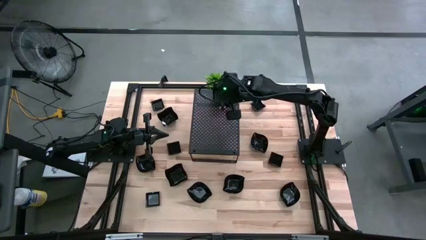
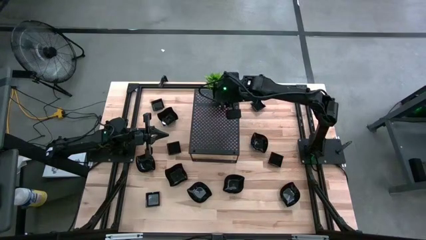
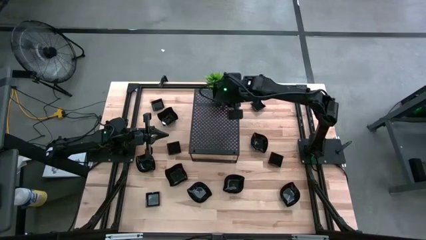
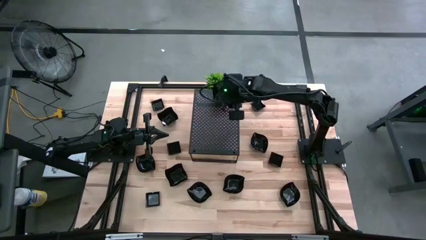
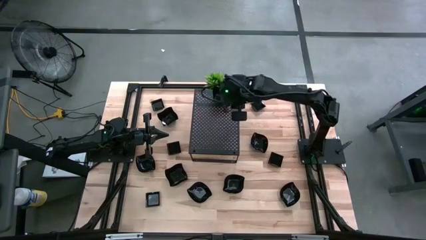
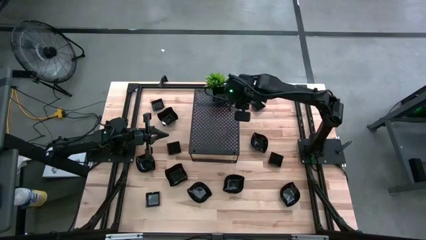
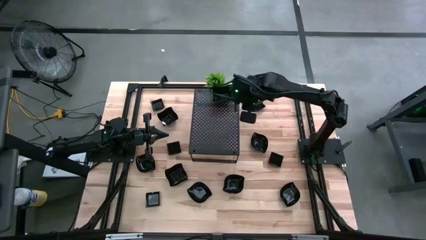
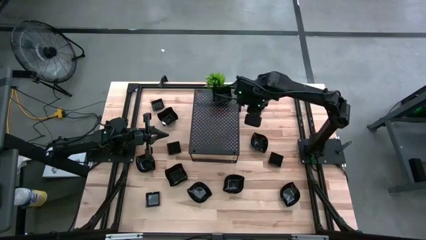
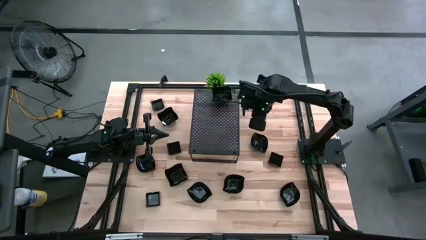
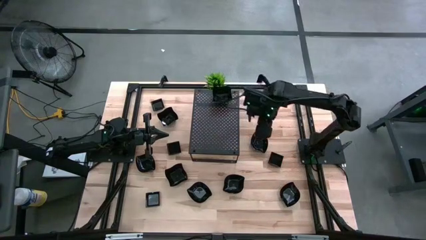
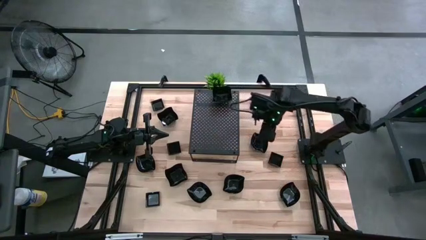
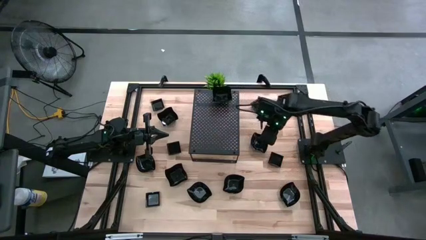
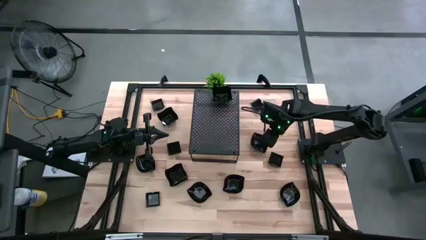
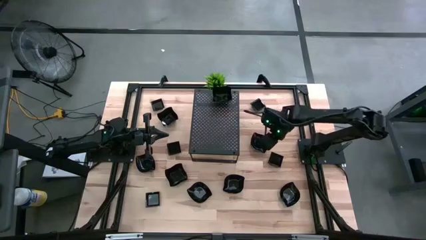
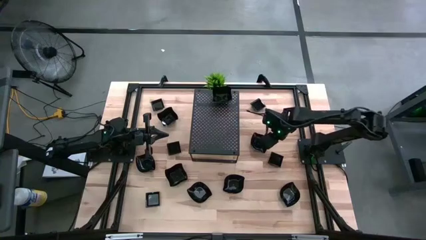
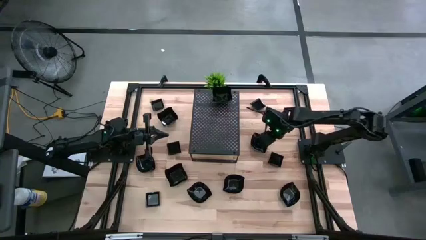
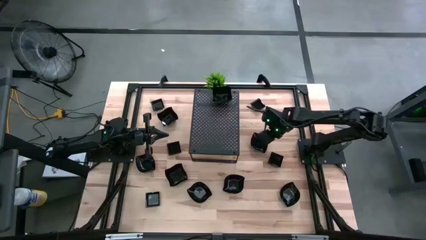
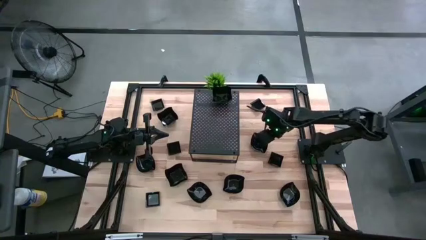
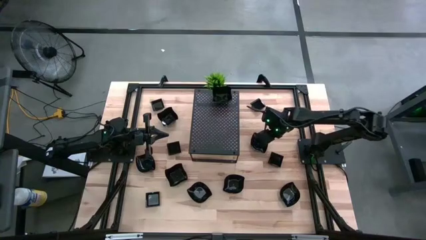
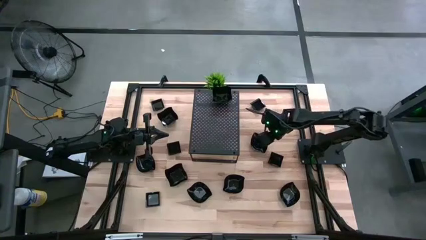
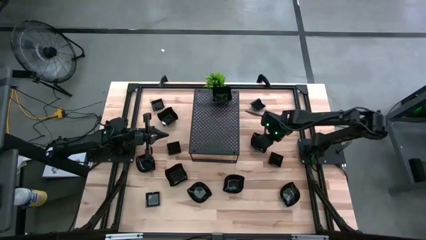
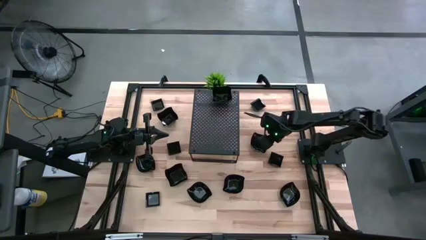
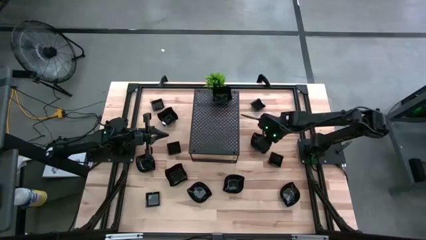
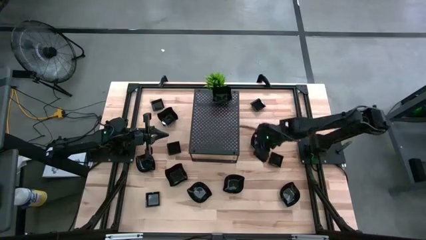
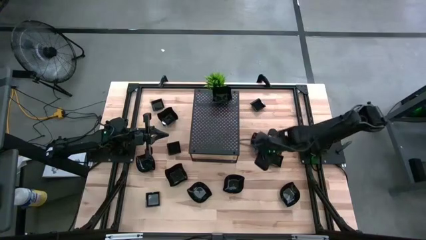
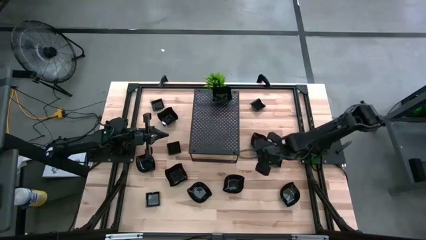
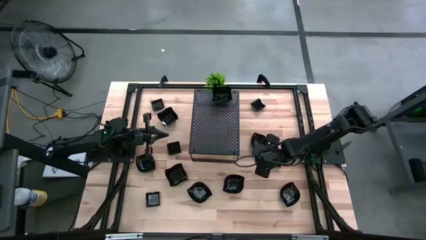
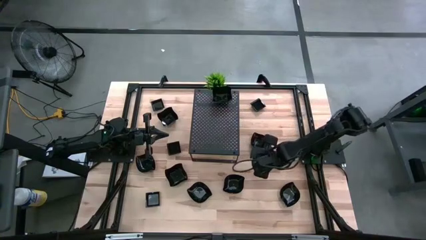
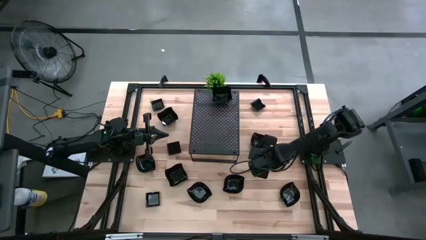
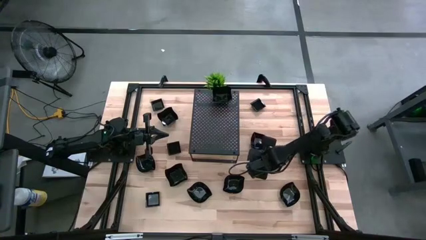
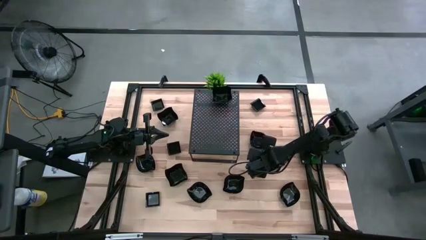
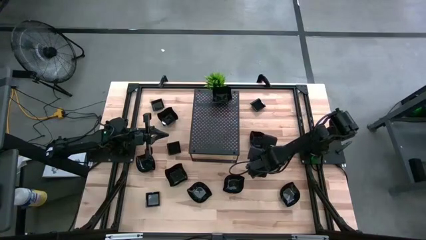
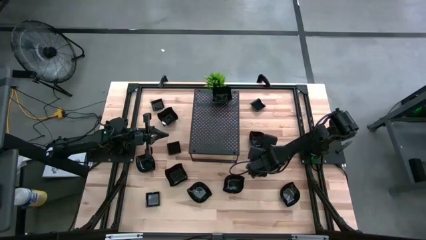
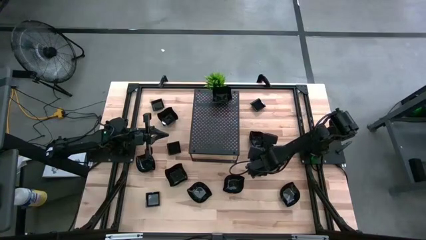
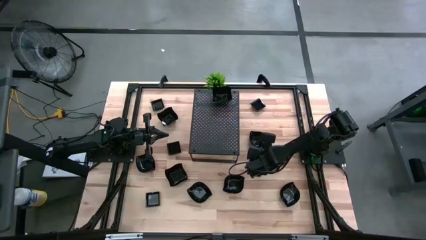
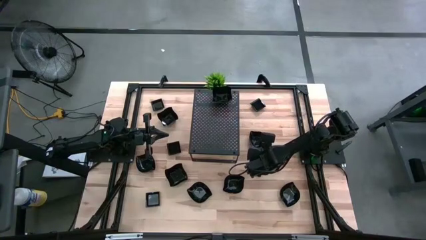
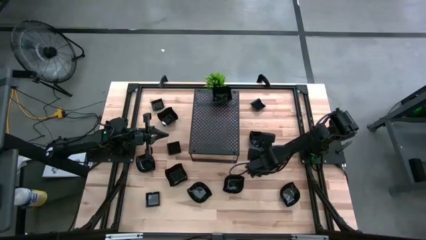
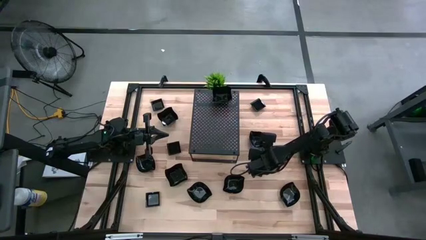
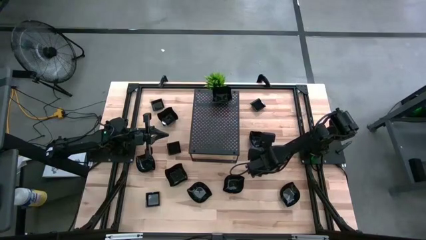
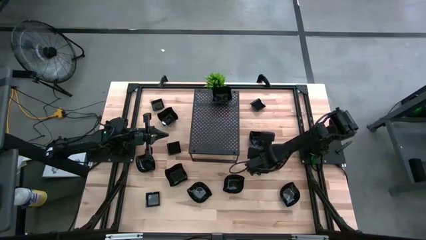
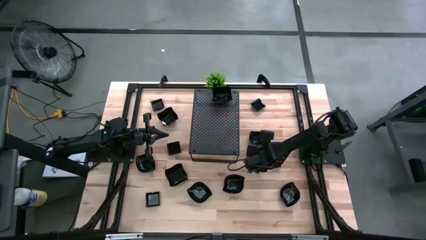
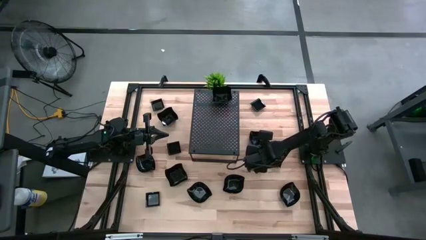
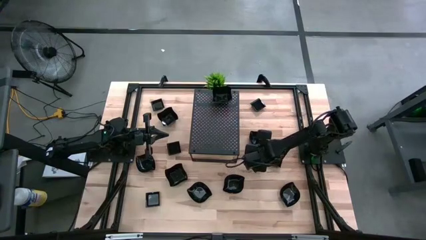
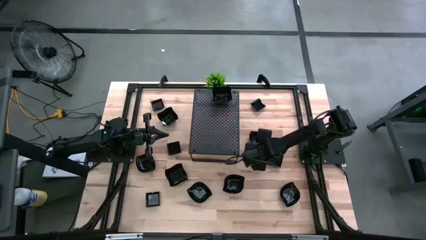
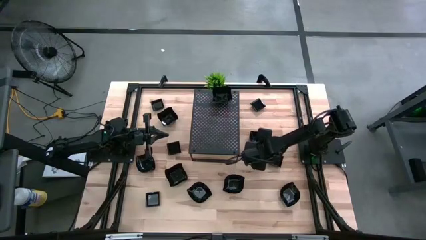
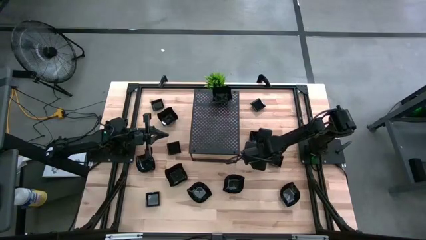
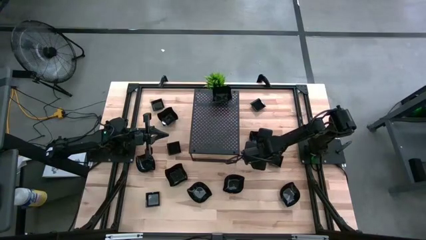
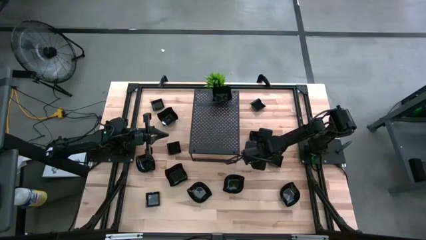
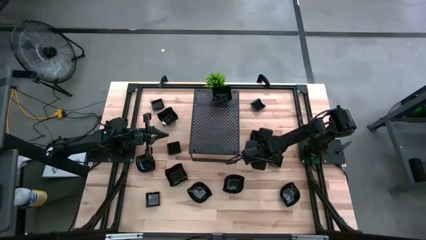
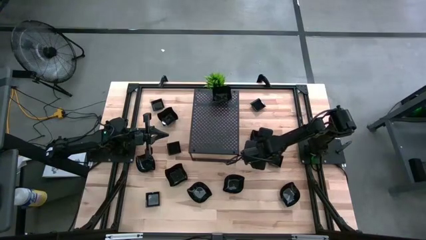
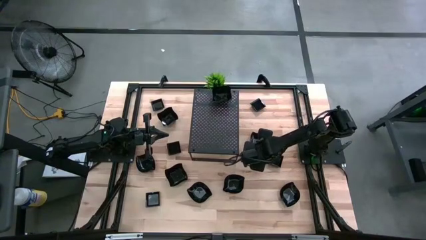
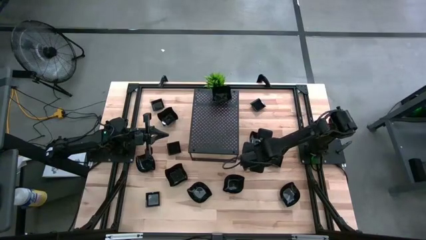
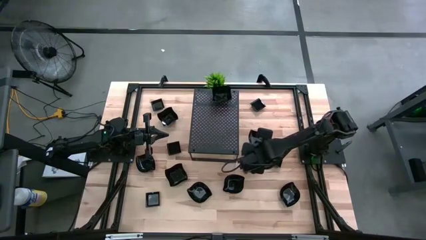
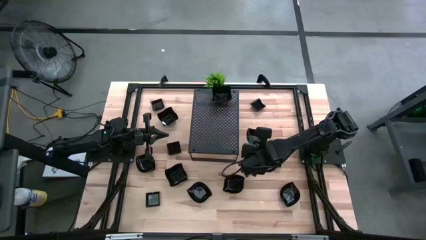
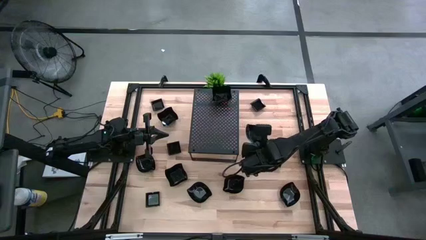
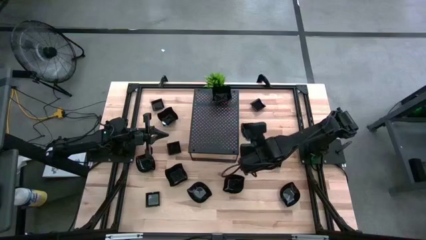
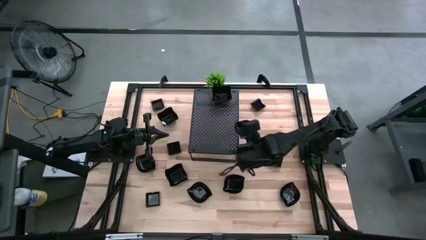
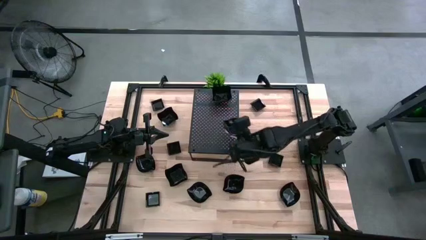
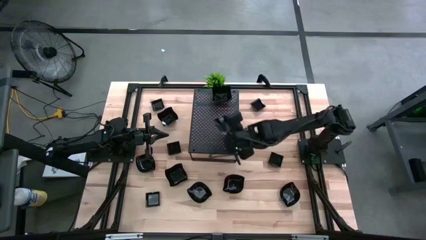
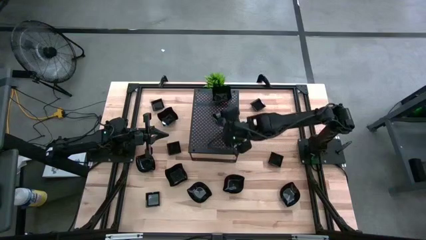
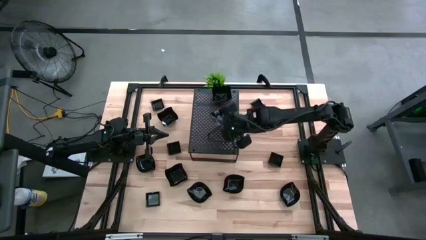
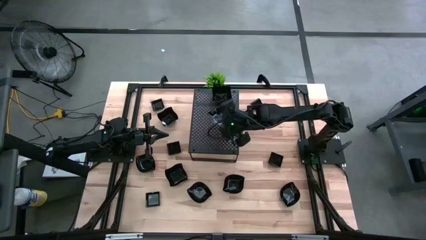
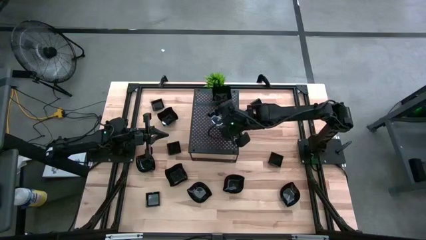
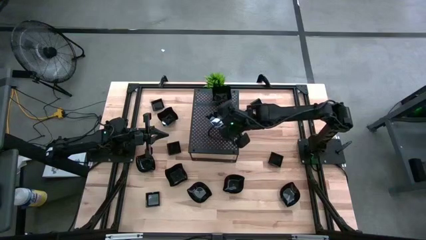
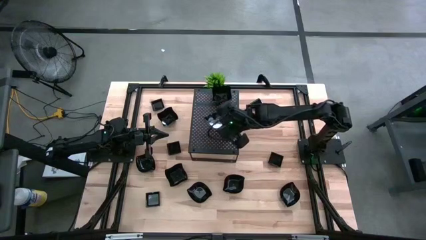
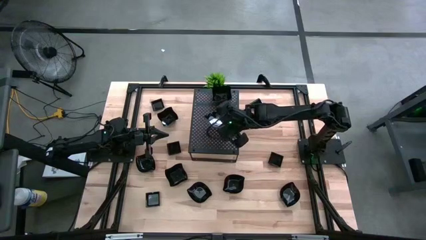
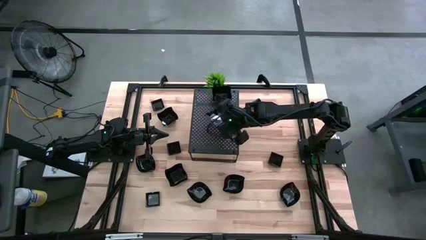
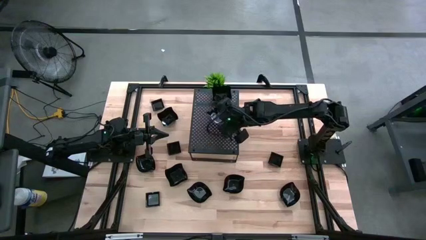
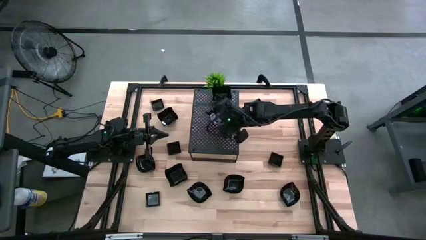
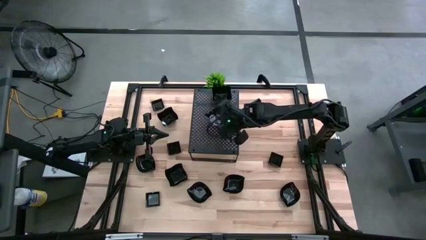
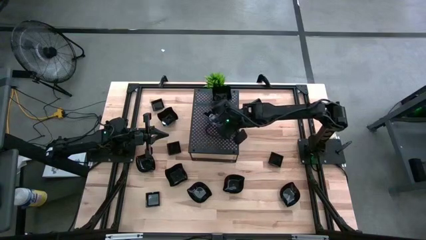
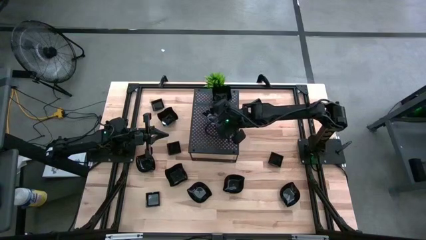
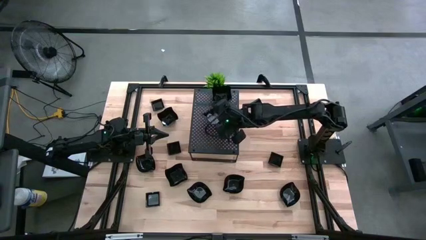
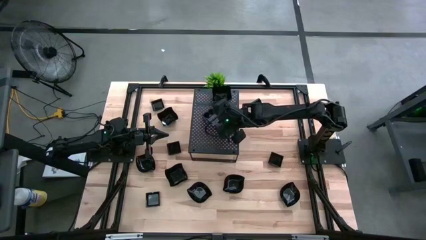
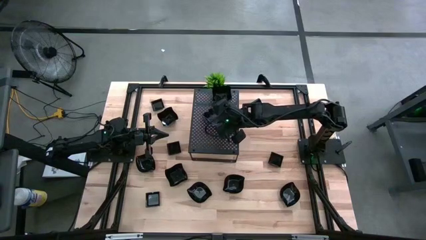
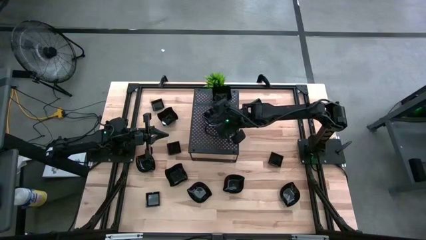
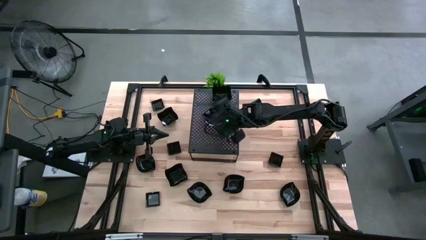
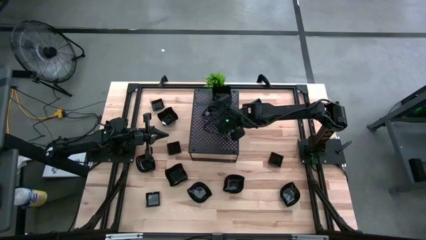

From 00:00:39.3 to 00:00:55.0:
Task: Pick & Place Mini shaped plates
Put the leaf shaped plate on the shelf
